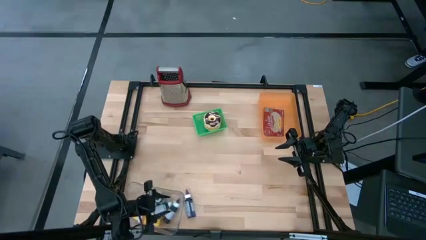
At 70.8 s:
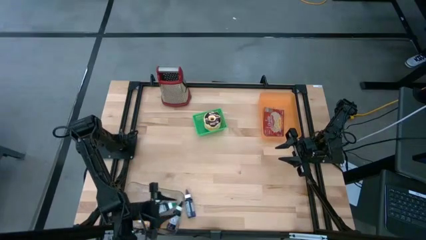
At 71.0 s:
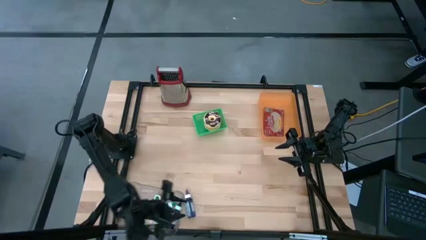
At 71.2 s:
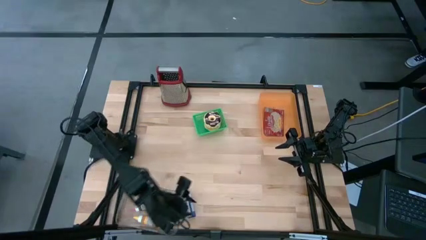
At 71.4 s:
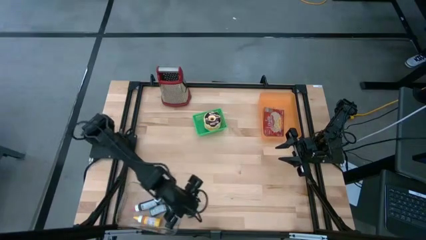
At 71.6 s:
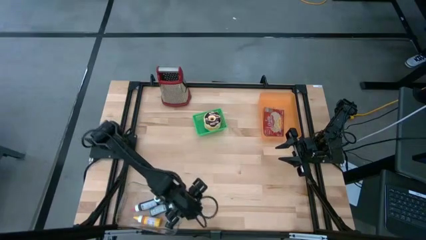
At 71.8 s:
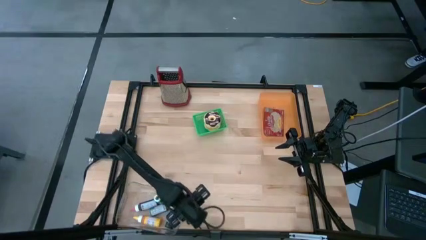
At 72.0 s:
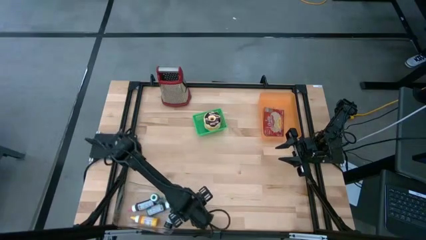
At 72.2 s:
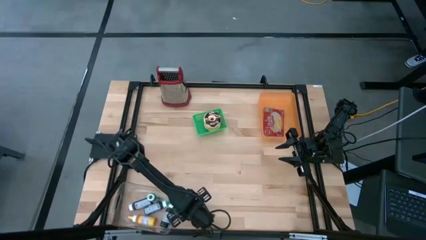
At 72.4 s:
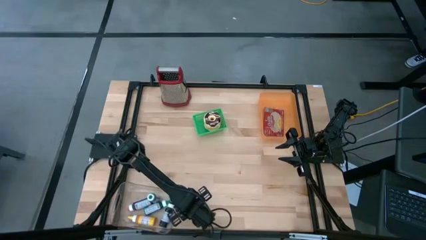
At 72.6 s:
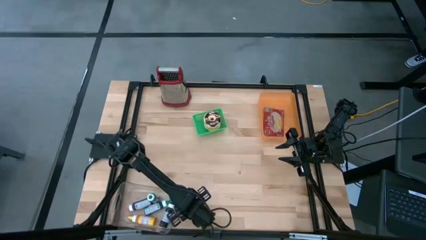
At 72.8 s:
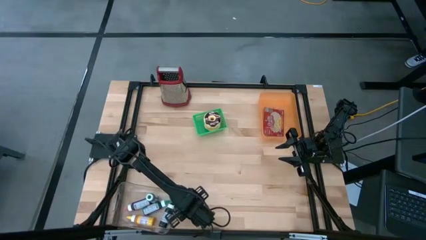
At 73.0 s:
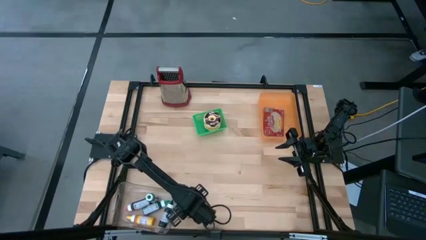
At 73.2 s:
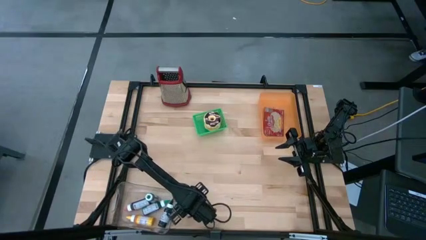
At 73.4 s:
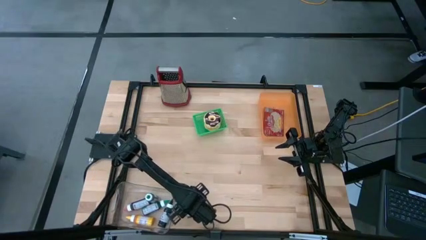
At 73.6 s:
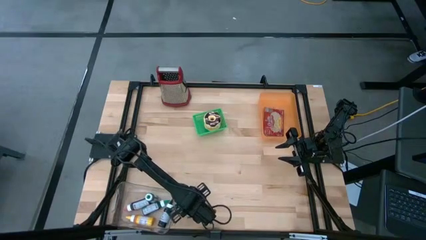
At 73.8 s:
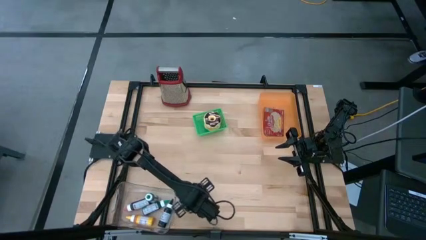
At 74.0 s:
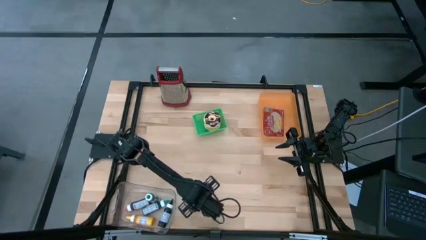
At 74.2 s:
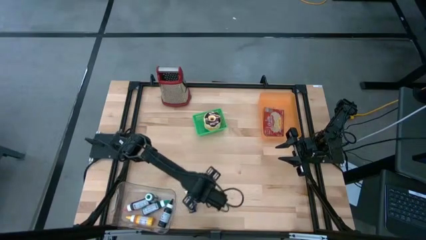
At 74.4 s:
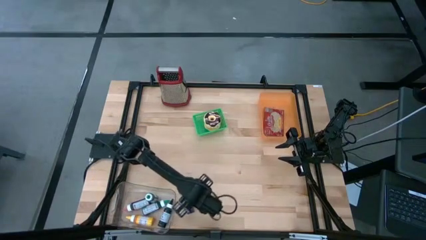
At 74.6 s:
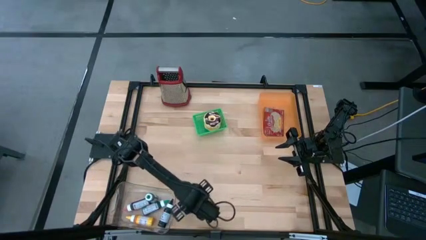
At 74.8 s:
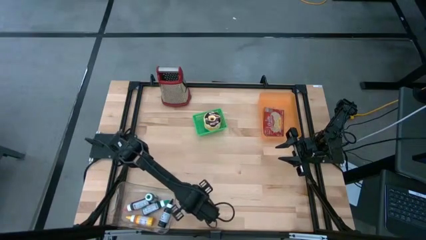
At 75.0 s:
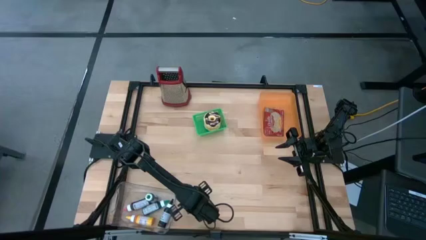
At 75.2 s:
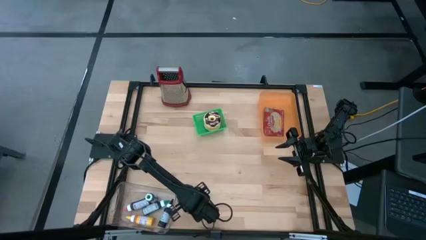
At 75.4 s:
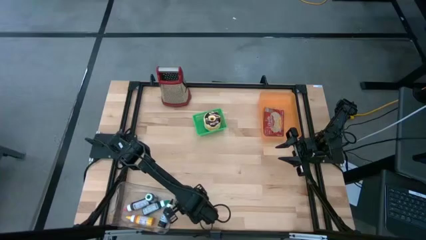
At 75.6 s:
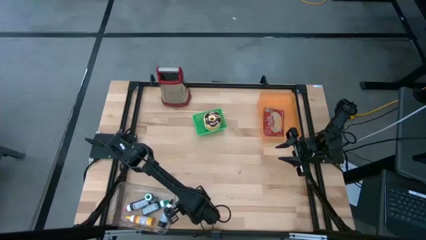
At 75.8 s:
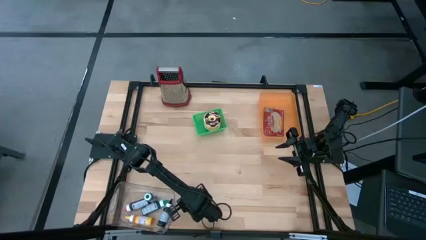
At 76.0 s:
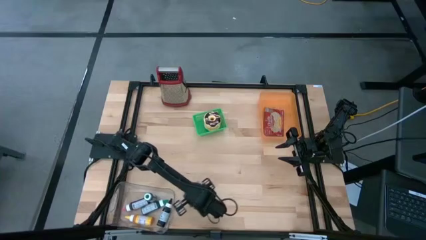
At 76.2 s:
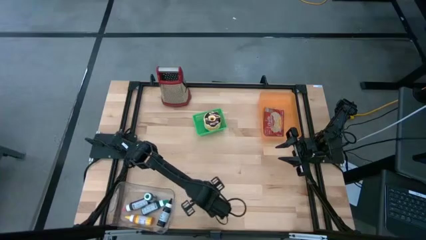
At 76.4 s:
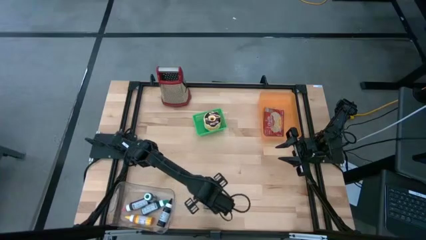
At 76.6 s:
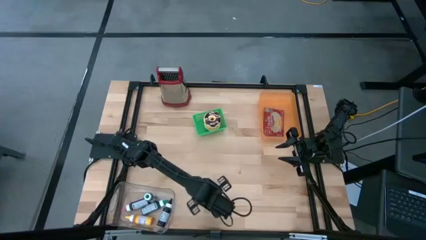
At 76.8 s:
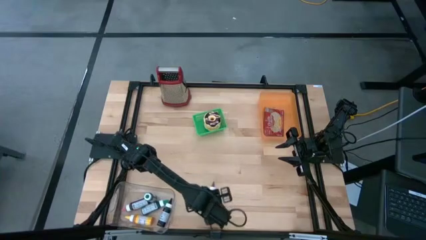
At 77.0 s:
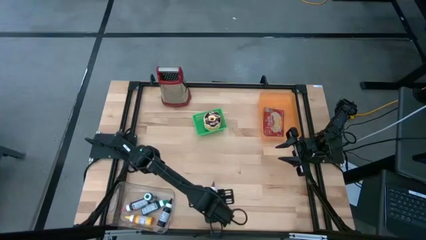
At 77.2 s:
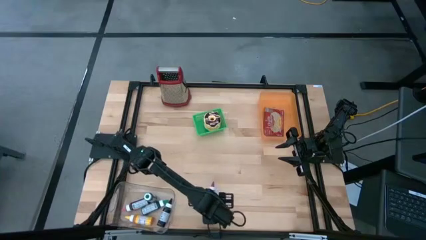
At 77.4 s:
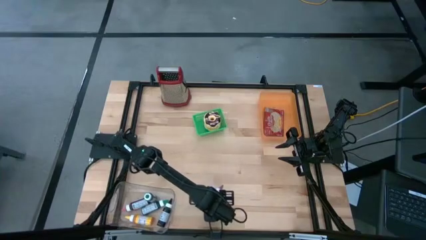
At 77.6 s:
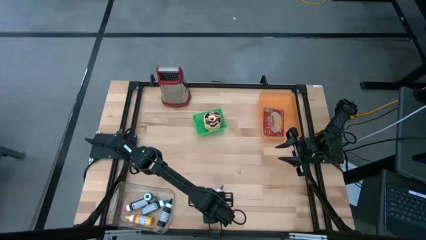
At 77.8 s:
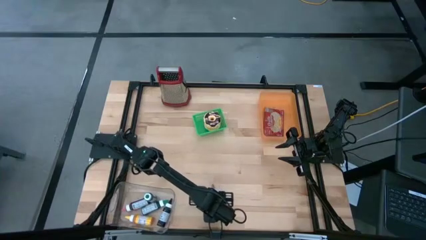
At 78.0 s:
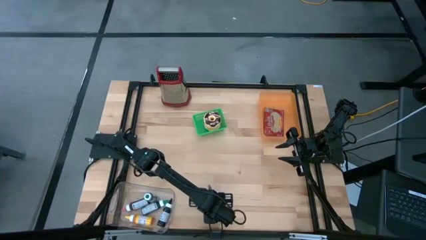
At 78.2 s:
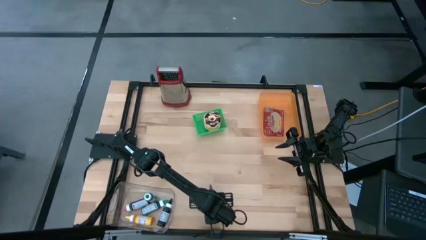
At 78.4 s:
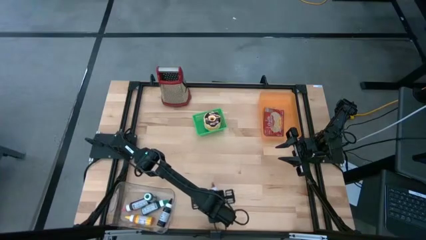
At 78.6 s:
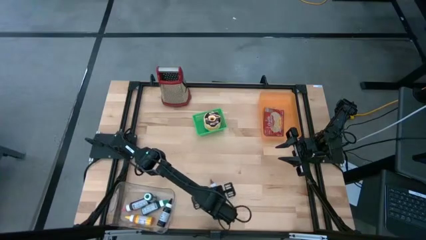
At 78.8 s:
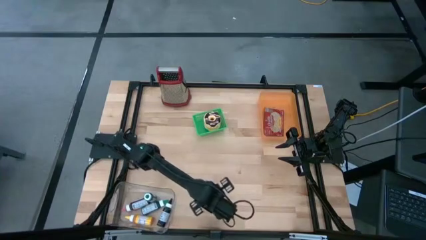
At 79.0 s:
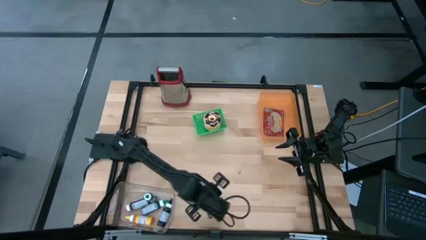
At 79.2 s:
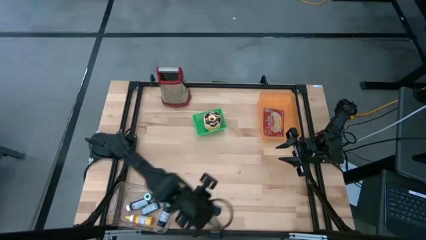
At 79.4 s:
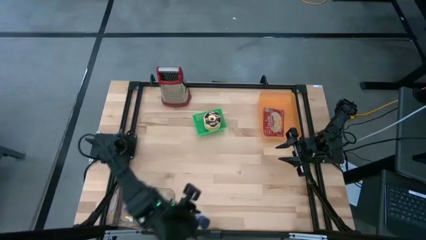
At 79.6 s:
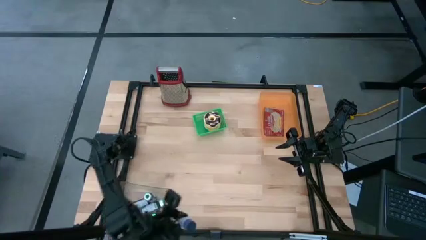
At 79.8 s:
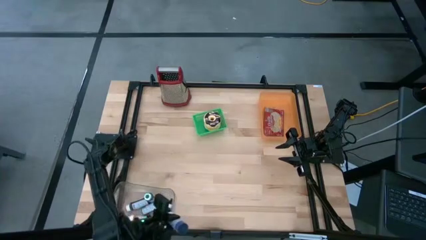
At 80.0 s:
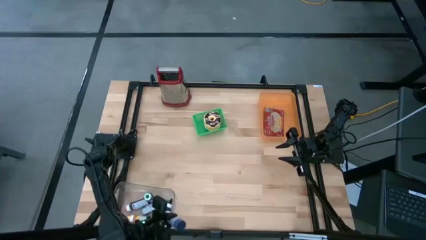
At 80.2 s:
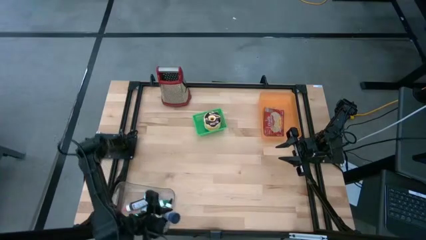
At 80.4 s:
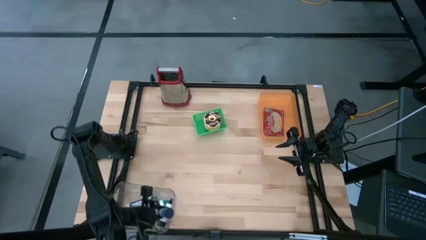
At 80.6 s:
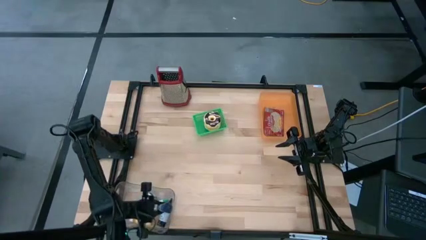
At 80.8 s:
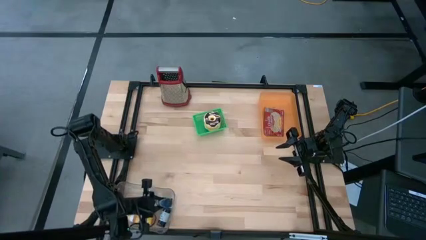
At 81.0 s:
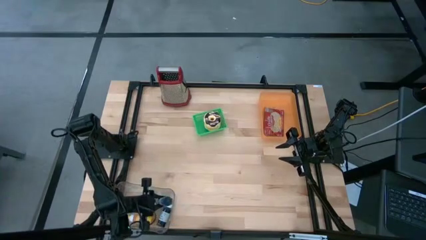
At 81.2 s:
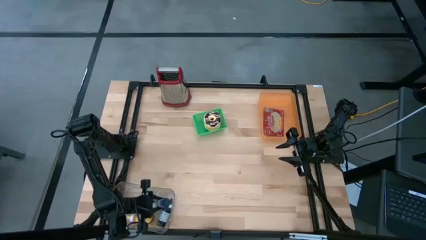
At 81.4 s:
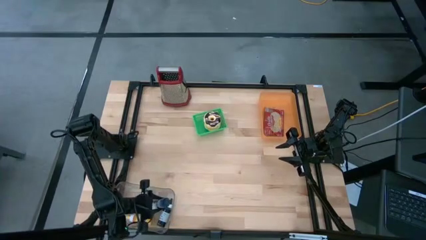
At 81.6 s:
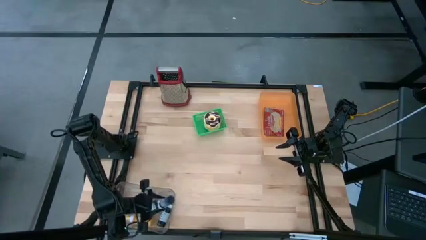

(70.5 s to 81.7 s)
Put the violet food coloring bottle into the transparent bin
